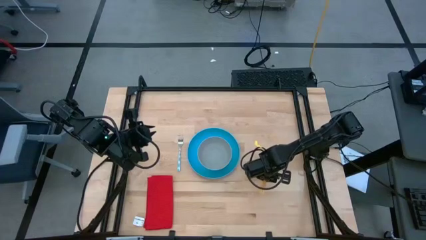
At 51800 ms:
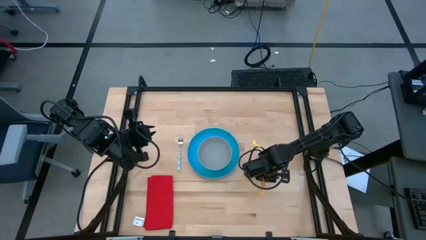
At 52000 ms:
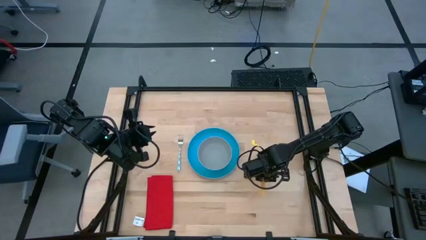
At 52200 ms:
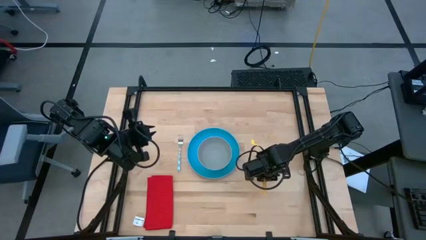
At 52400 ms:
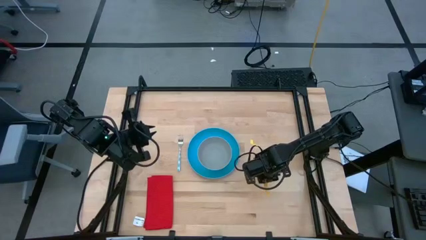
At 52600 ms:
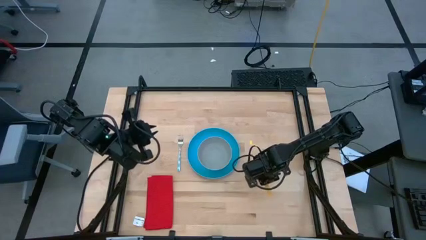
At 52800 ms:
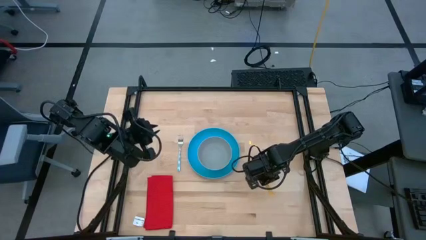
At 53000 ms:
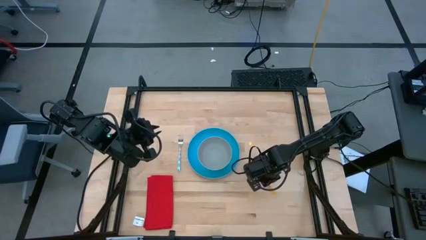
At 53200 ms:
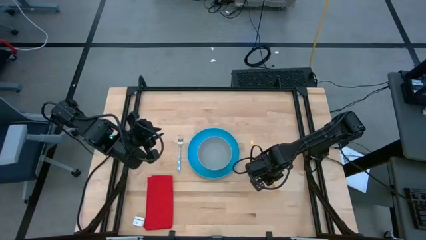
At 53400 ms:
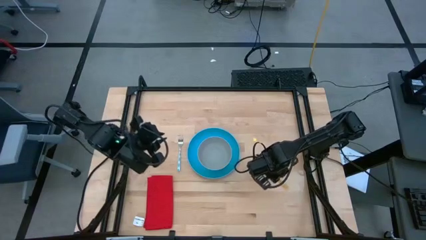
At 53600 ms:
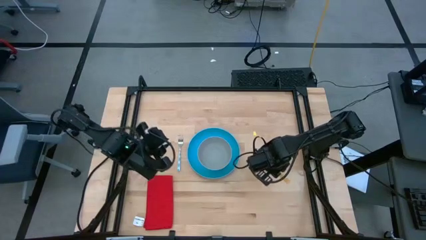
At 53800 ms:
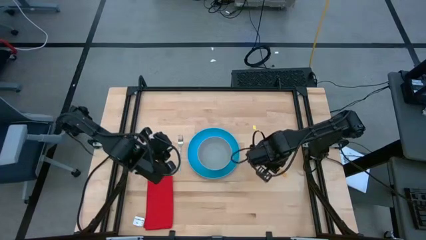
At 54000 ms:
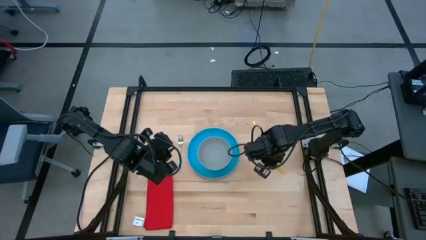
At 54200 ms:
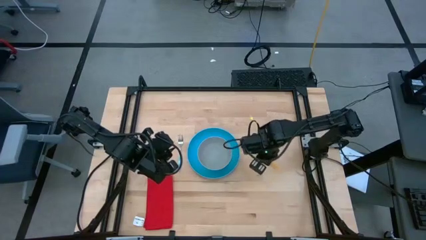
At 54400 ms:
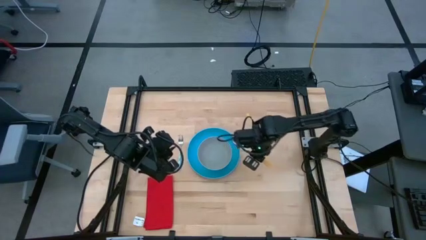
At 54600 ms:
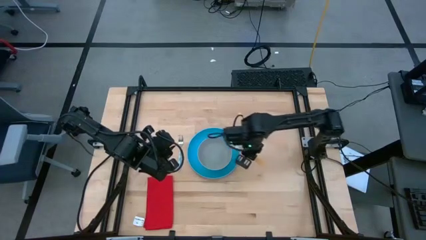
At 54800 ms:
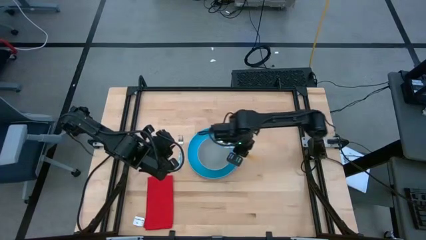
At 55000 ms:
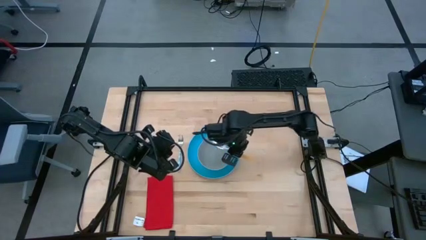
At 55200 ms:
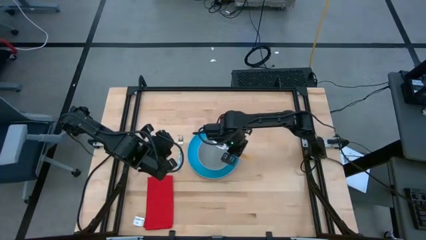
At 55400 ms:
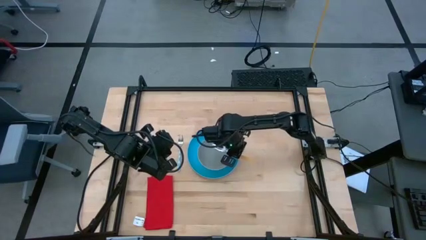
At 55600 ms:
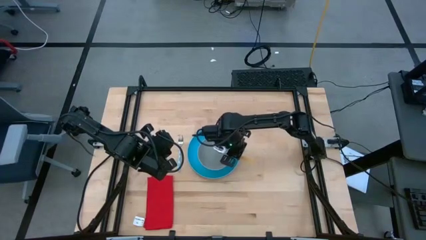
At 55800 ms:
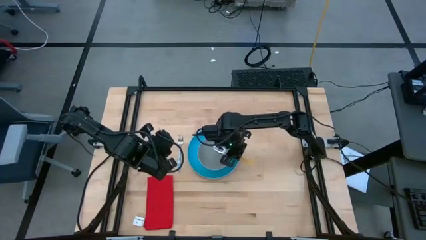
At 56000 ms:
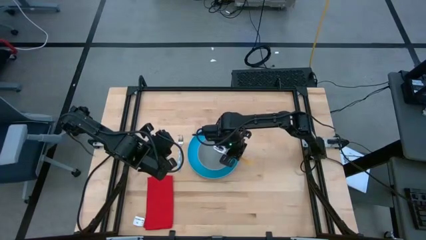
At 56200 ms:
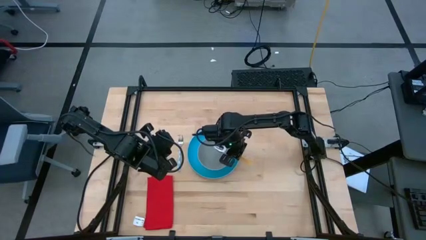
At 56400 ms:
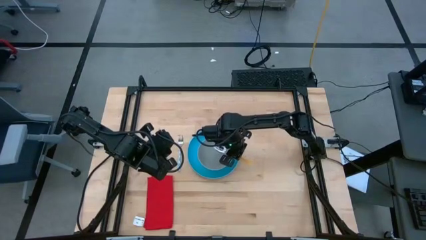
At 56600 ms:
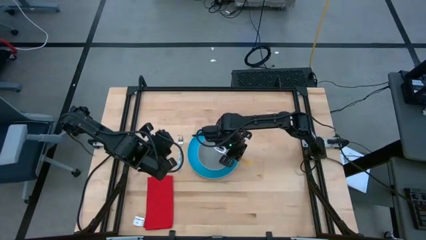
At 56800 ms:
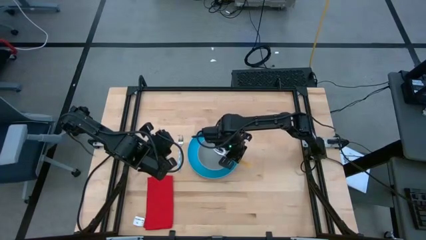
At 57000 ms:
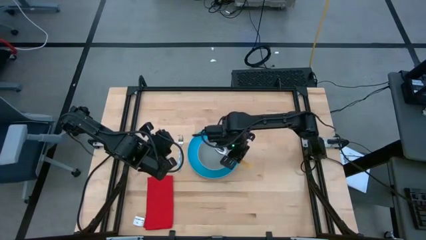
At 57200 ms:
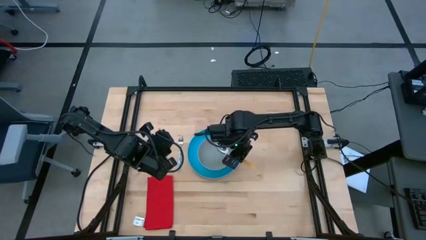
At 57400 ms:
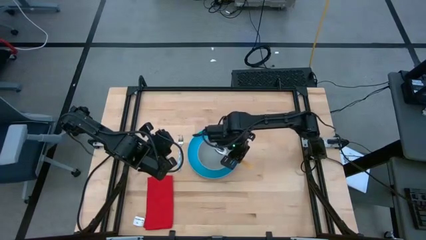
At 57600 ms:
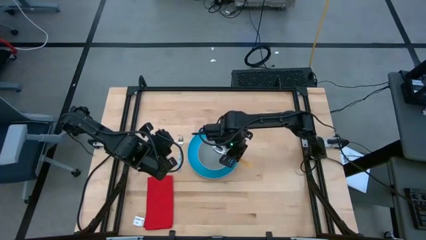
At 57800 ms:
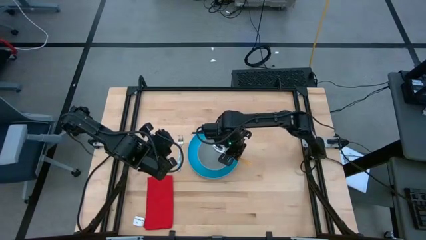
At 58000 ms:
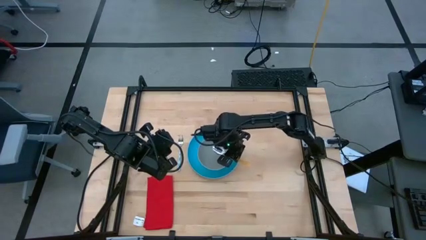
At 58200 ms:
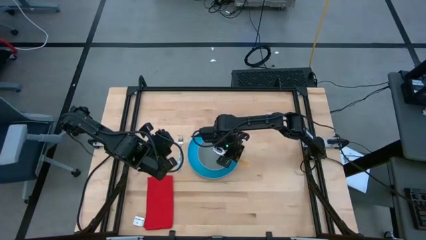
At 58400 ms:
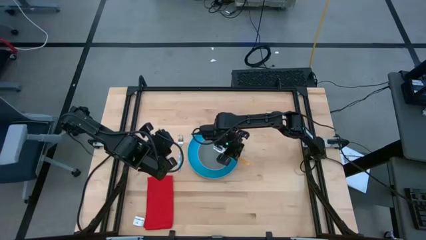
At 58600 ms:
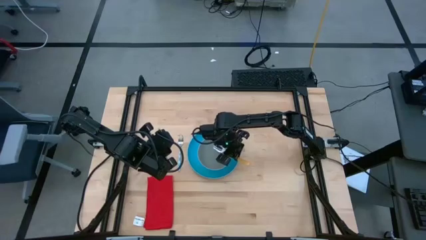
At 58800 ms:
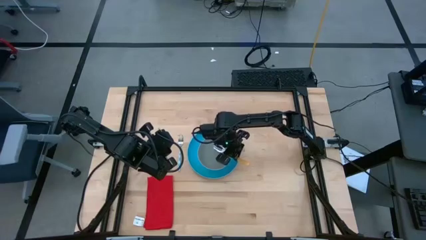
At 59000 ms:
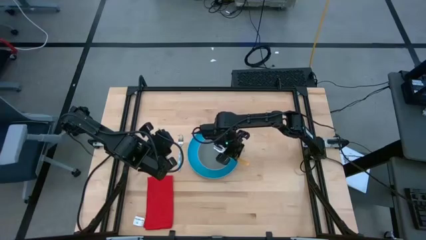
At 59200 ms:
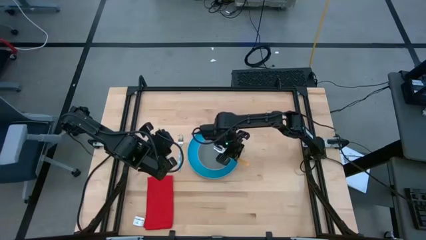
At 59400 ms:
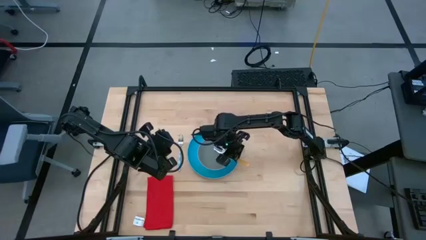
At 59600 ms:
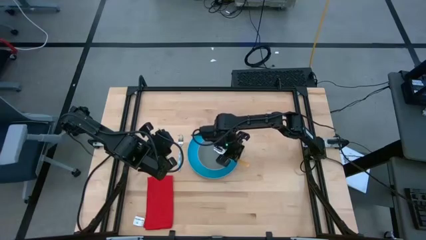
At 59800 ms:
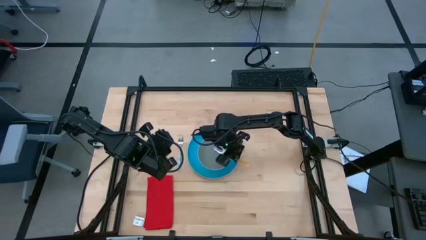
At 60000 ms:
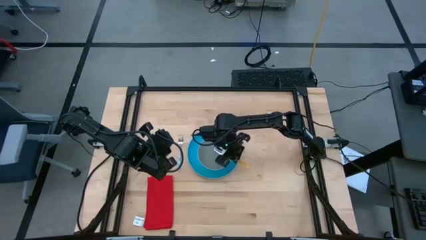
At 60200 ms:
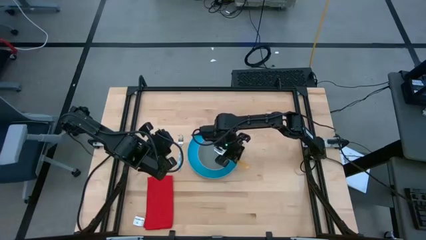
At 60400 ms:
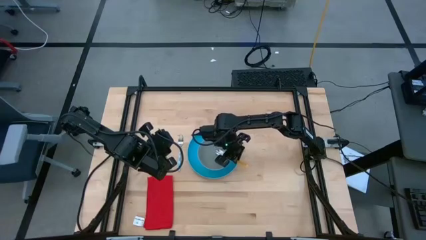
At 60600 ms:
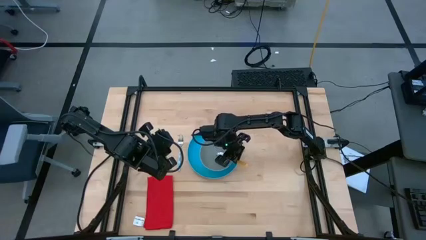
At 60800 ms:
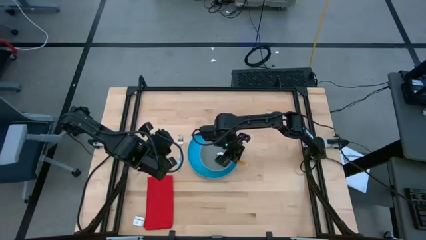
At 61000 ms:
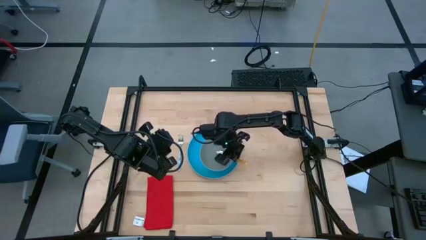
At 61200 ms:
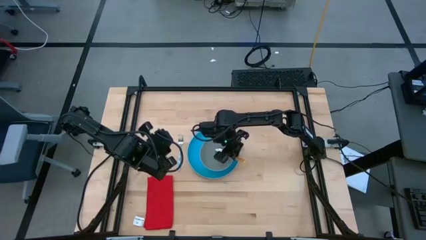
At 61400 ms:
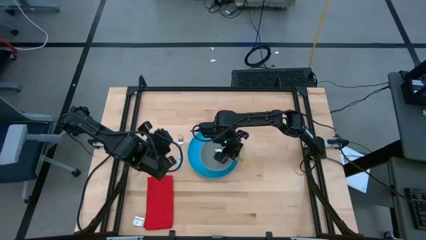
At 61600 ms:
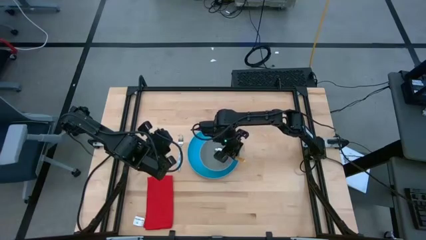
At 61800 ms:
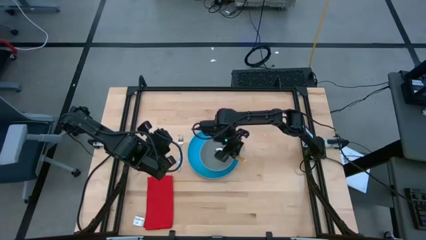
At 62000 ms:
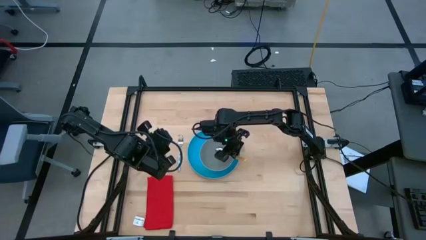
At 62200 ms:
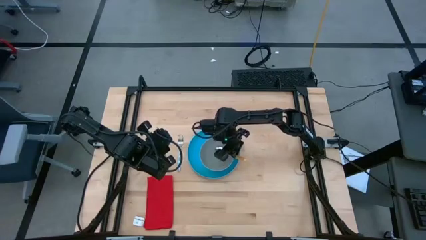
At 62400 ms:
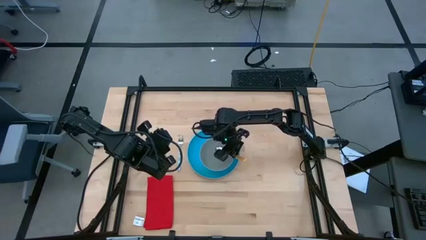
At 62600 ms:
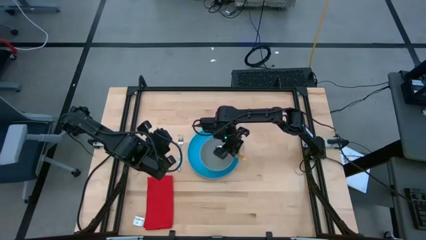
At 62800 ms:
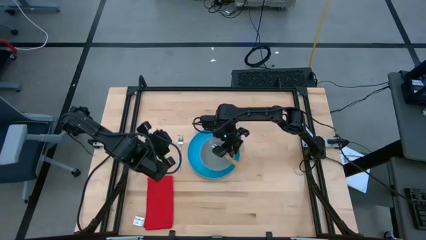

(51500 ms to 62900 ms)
Task: Set table place
Put the orange spoon into the gray bowl
